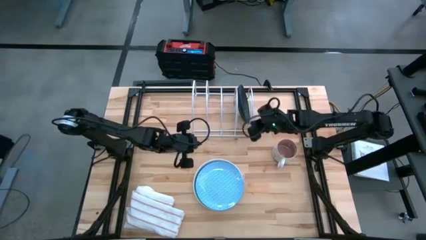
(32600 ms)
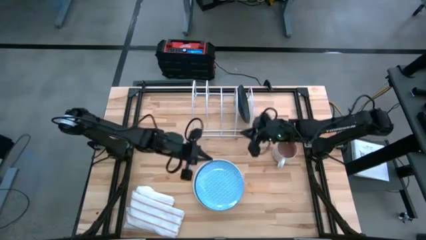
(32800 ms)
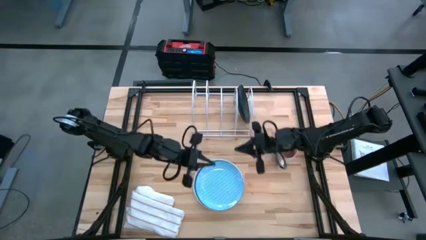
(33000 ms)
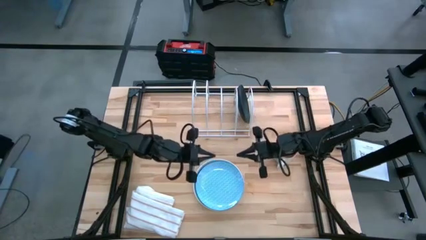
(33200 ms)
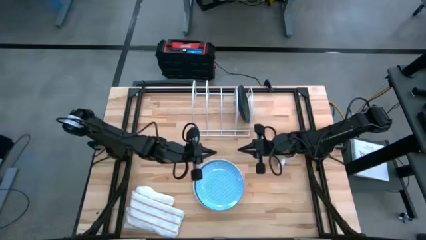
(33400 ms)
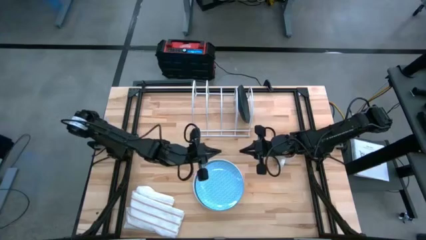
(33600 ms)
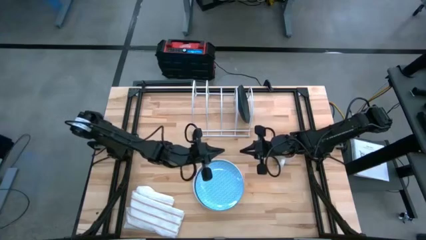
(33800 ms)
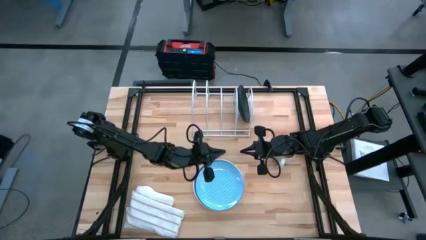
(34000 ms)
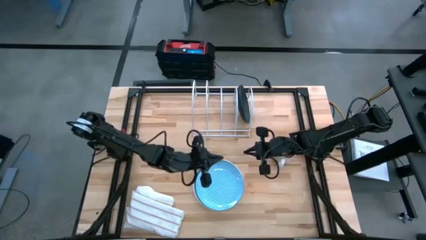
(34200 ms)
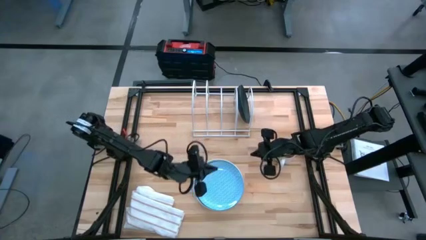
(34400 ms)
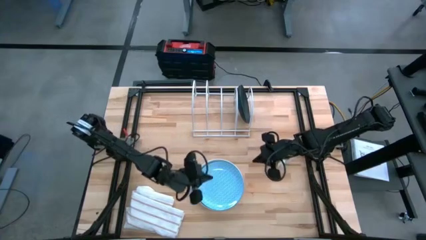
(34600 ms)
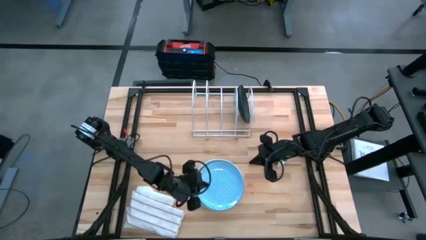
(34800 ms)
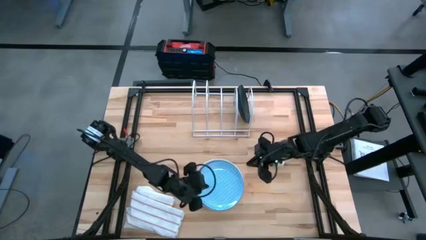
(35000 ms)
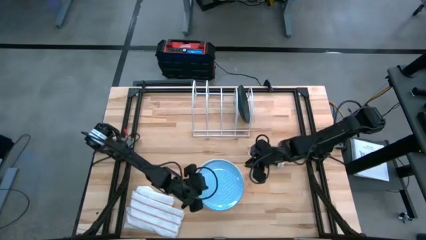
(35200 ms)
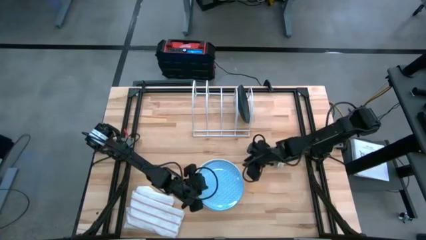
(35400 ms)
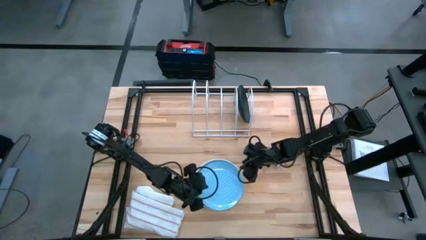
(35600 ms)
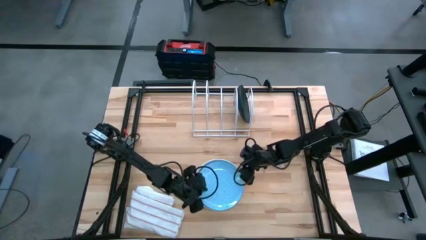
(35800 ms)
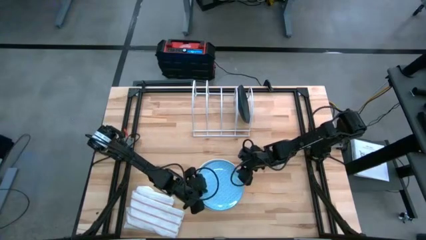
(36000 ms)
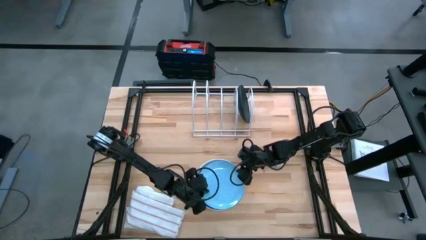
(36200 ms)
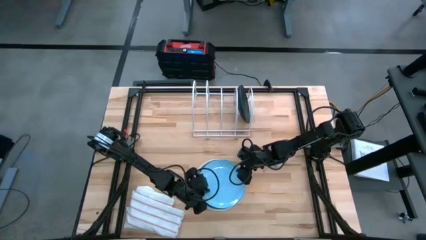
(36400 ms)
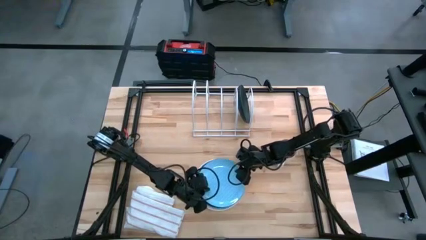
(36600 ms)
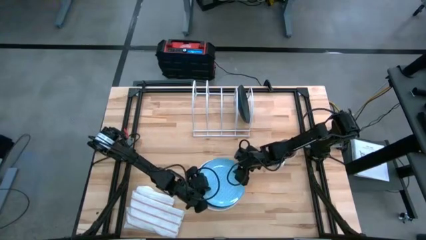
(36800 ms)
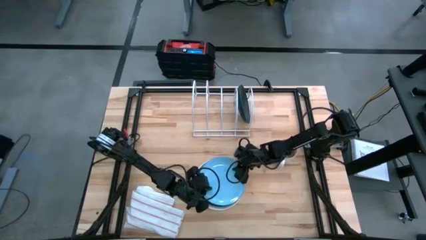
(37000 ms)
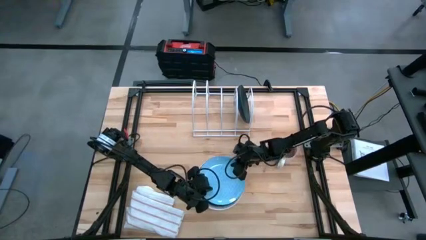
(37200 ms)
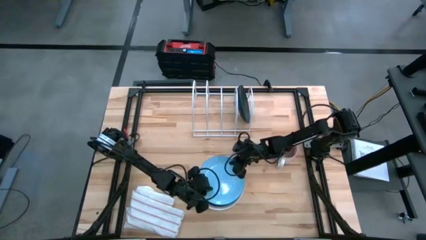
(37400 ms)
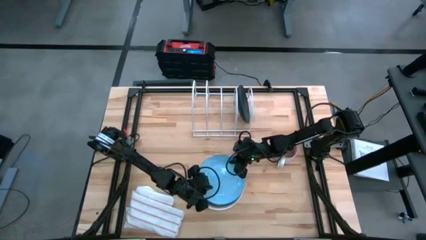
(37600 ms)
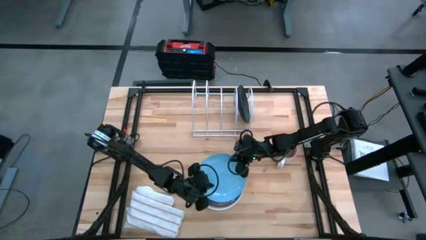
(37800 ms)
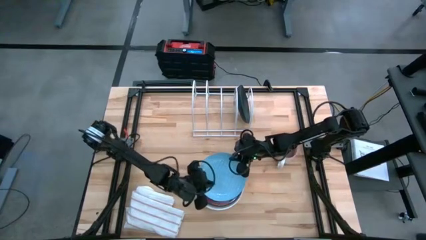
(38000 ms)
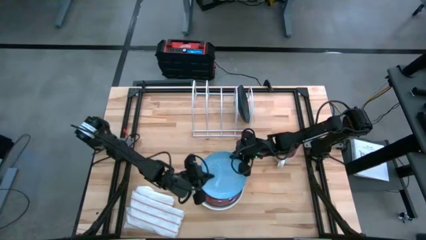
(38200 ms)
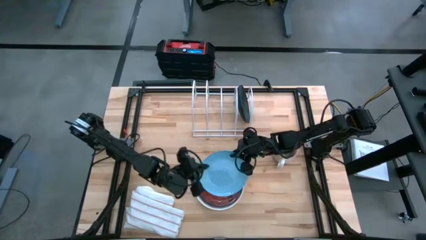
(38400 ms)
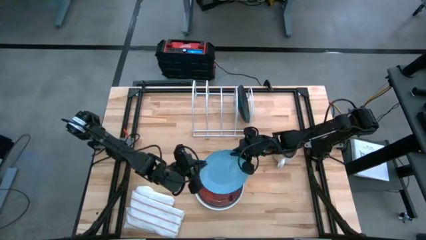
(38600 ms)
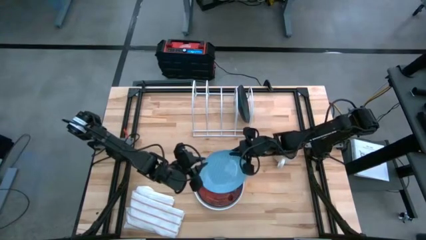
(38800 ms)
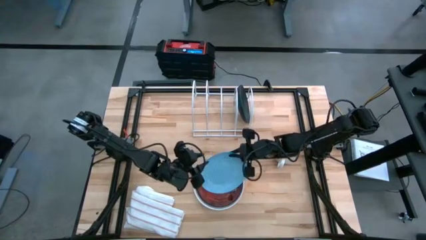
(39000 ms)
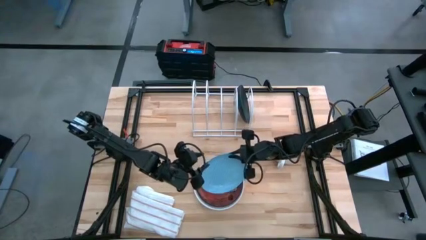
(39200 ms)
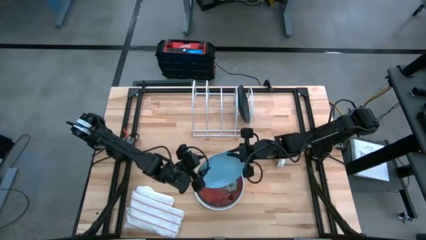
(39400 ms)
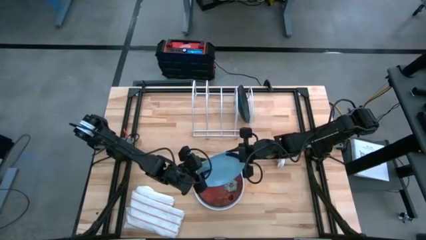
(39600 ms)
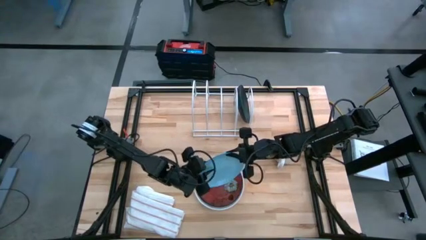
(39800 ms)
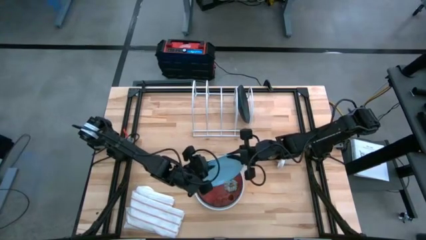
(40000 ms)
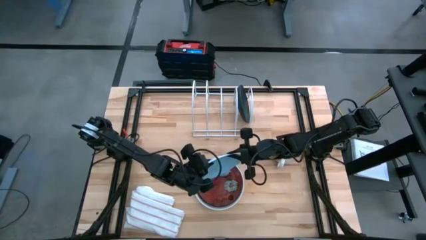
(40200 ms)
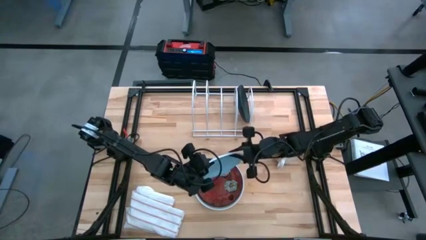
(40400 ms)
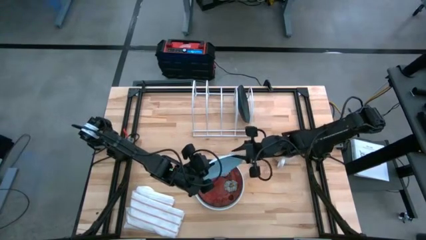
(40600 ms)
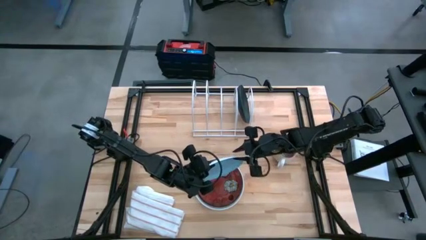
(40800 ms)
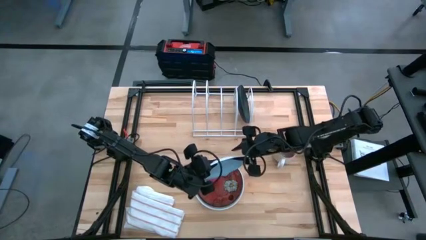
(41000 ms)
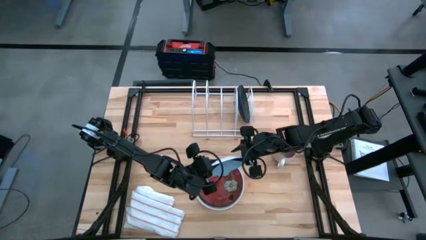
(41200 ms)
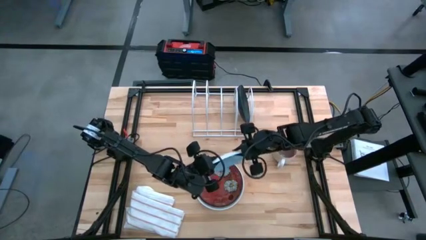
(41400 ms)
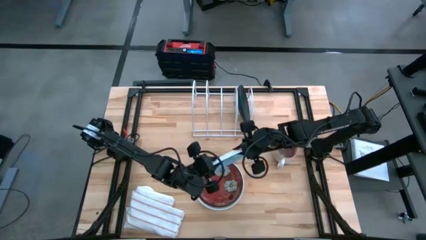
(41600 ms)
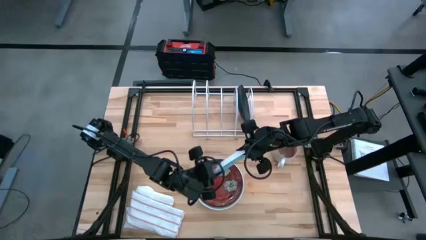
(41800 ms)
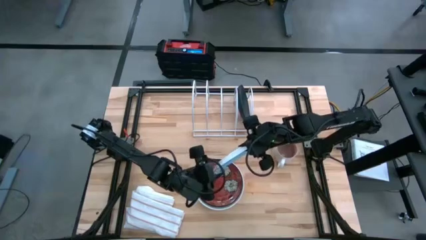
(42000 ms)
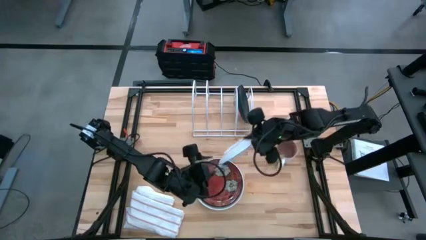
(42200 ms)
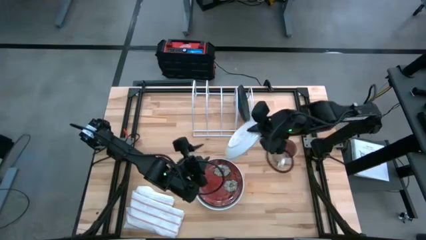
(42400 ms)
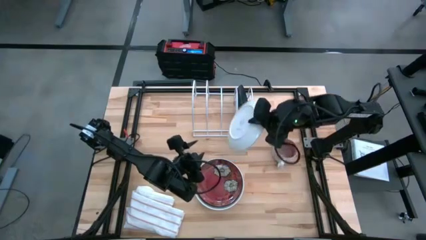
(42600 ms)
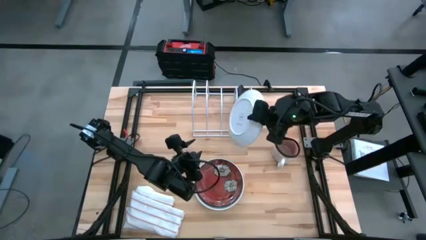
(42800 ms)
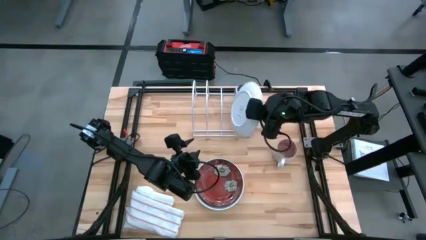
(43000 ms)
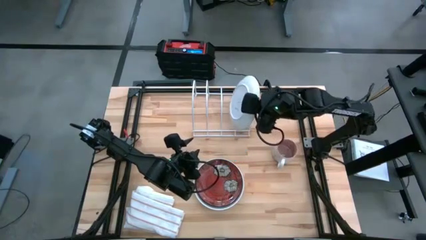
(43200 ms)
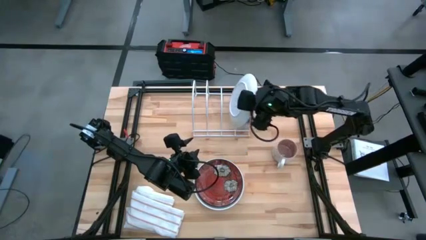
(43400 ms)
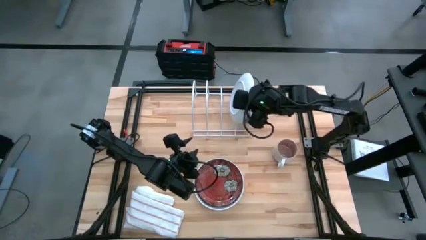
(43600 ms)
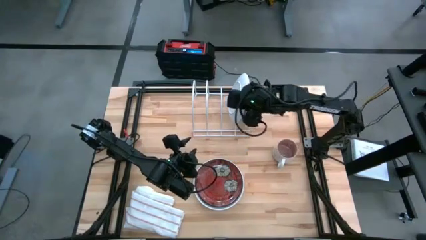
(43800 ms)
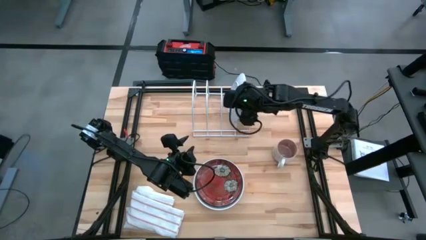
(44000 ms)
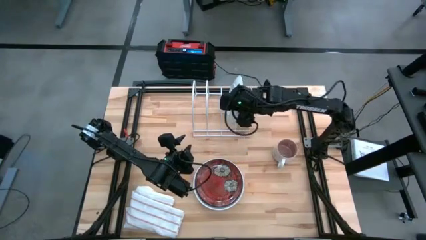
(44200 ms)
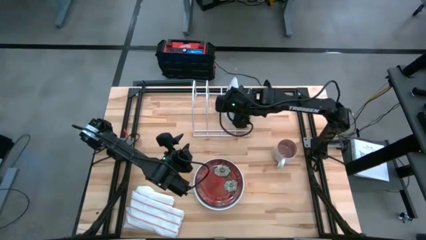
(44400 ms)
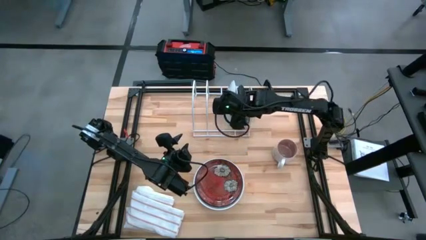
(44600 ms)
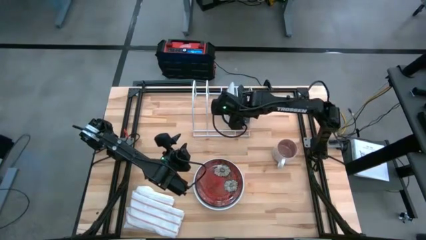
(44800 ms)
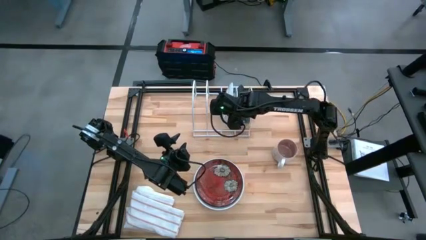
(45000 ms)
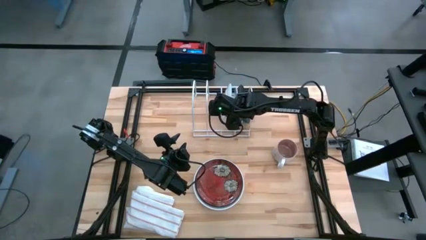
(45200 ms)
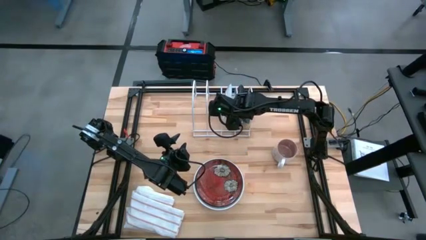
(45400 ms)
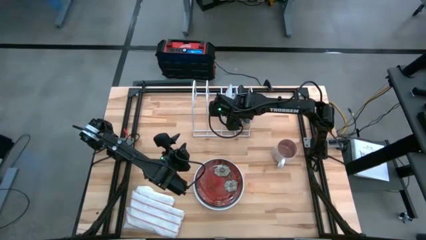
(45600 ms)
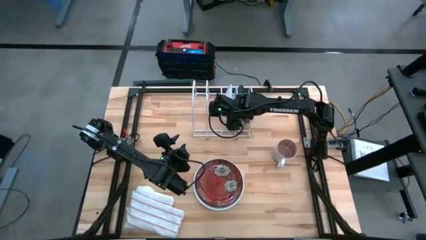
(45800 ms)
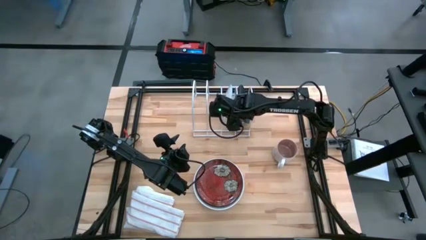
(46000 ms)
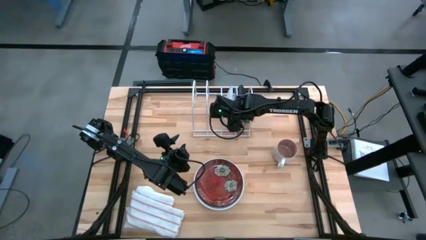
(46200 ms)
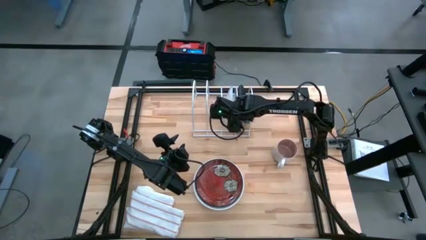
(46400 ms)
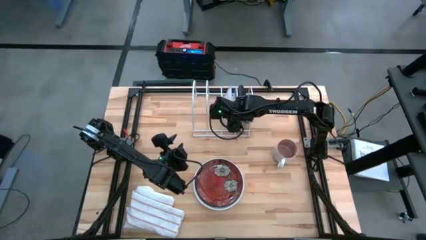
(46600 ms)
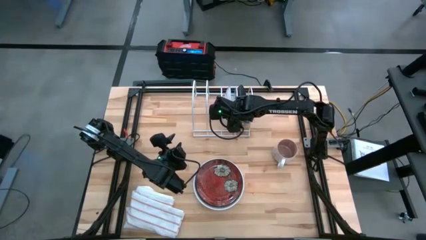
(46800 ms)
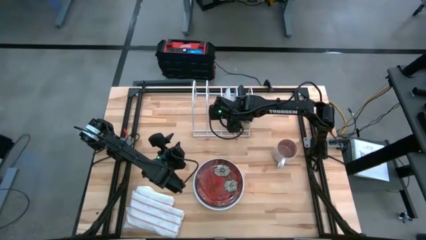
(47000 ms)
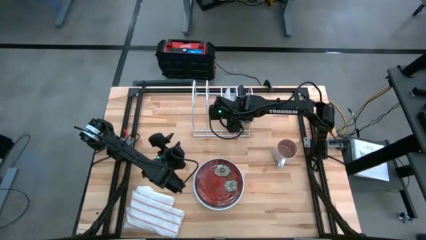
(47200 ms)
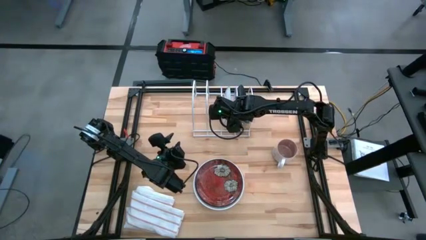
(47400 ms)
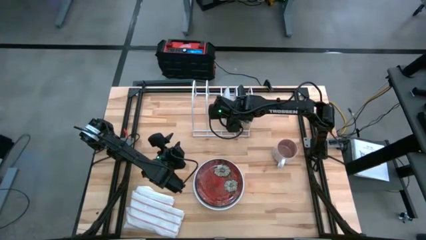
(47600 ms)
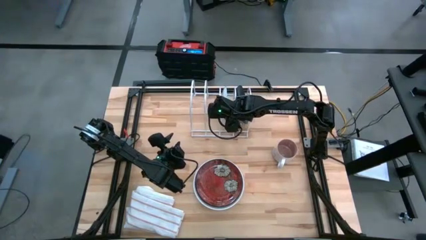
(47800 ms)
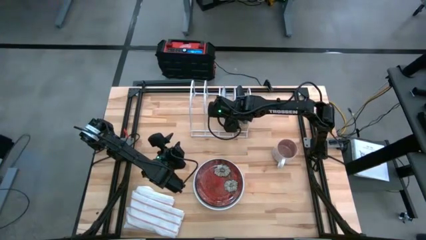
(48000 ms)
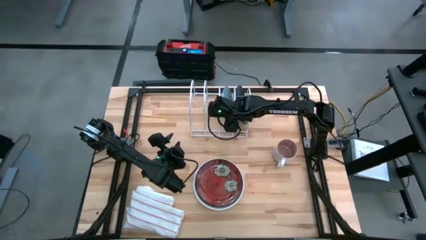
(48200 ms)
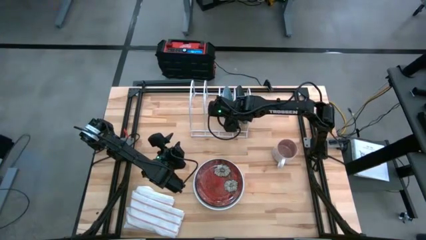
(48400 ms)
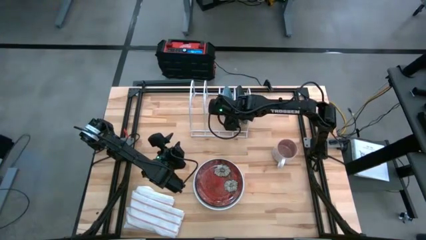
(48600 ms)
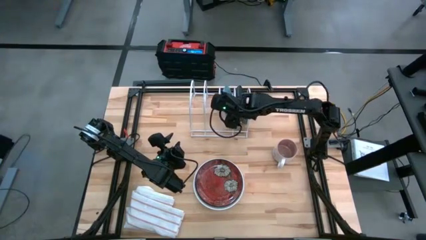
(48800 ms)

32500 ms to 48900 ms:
Task: Sort dishes
Put the blue plate in the dish rack
